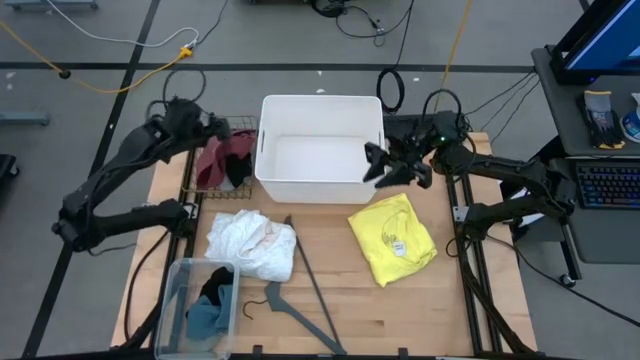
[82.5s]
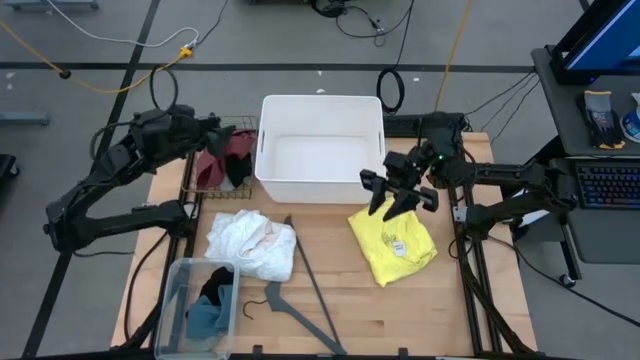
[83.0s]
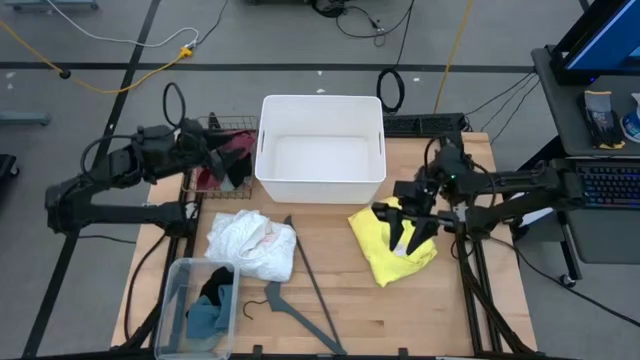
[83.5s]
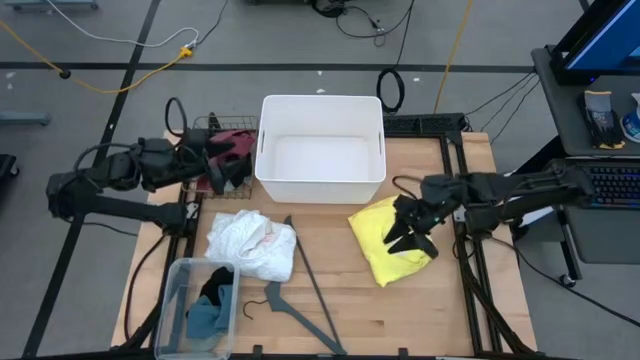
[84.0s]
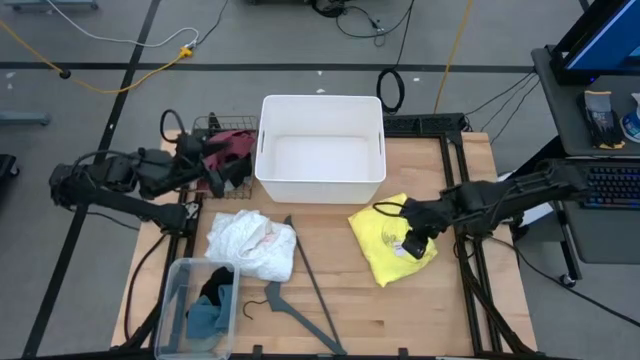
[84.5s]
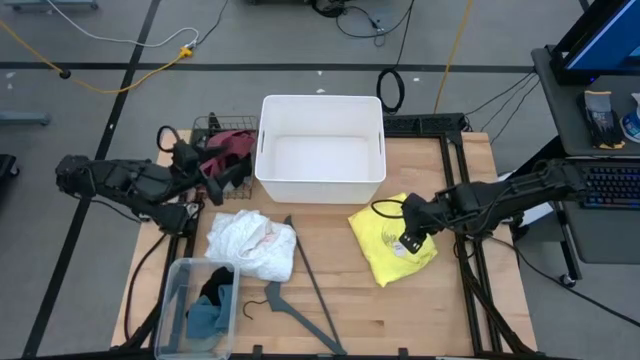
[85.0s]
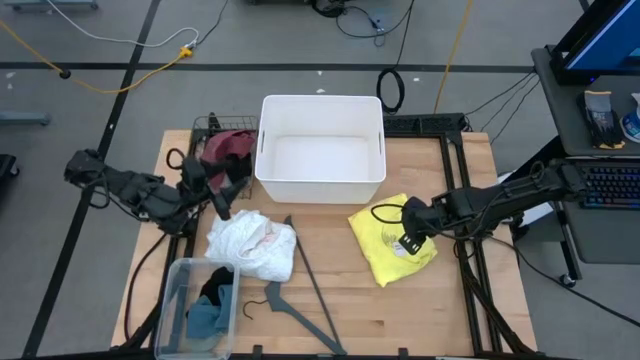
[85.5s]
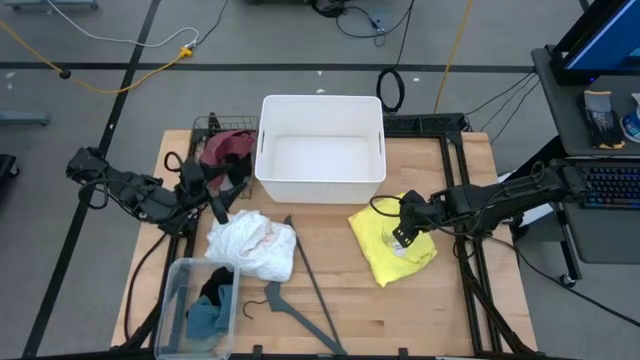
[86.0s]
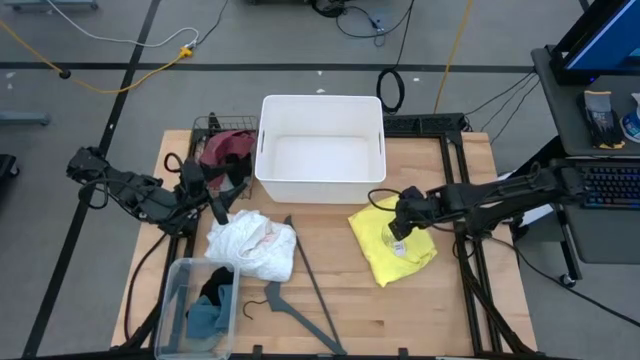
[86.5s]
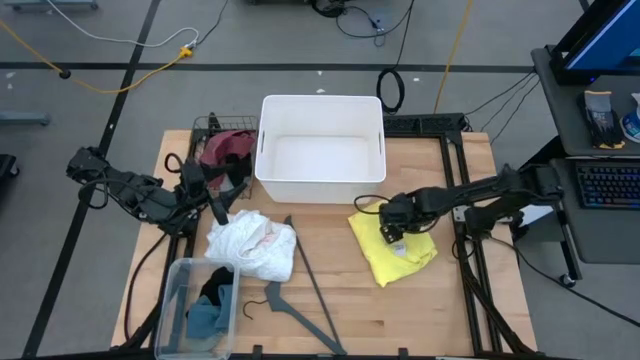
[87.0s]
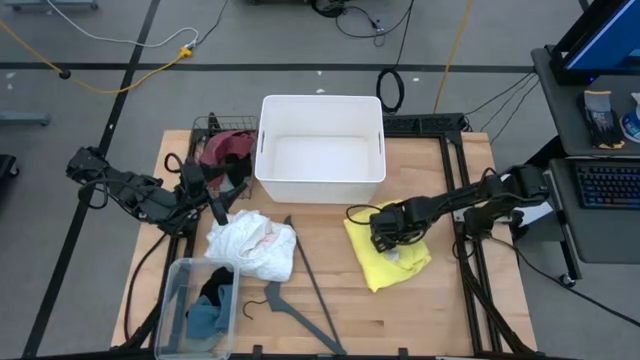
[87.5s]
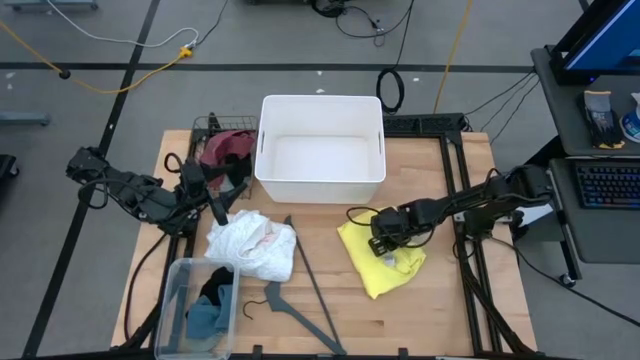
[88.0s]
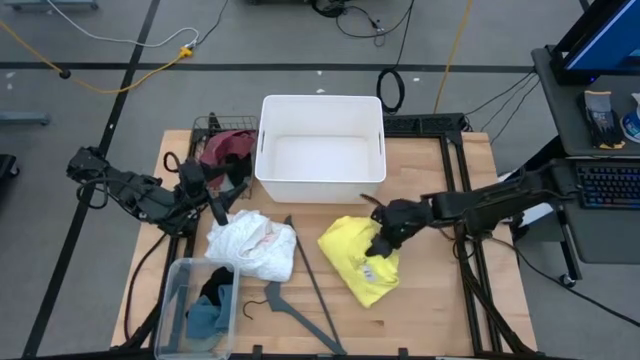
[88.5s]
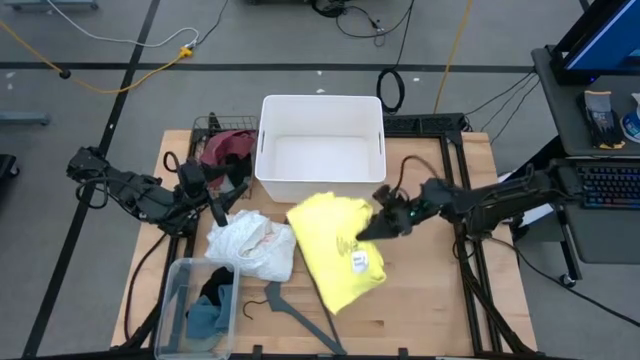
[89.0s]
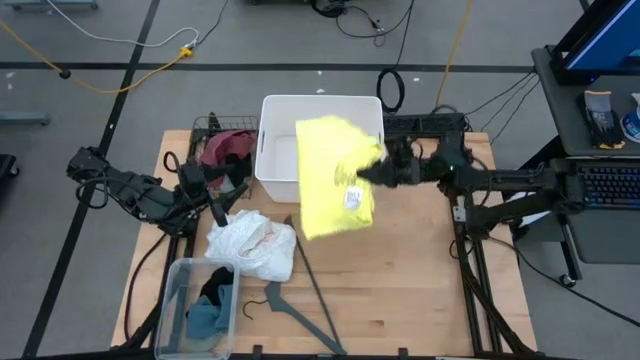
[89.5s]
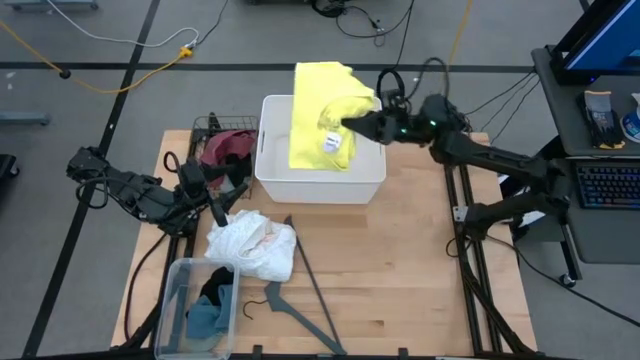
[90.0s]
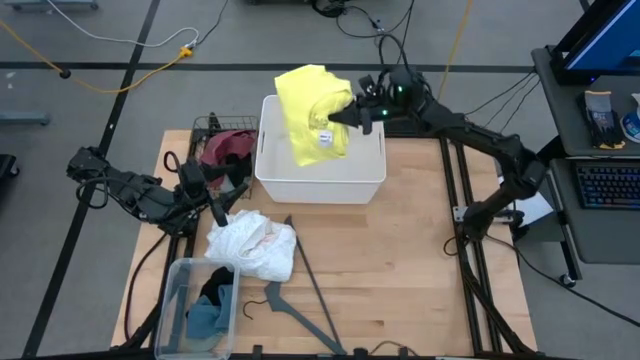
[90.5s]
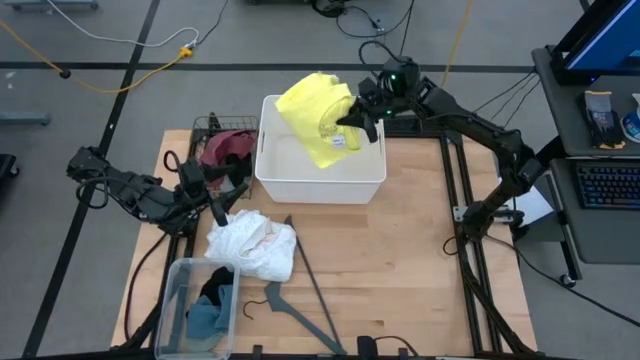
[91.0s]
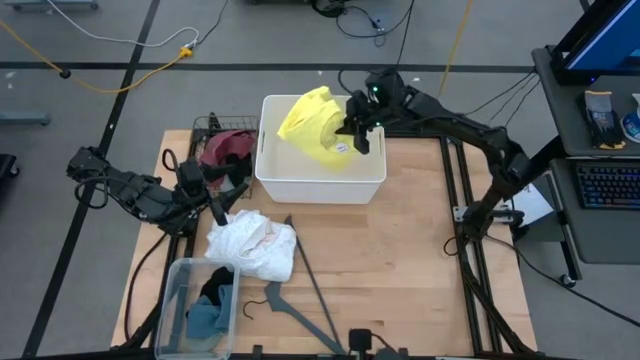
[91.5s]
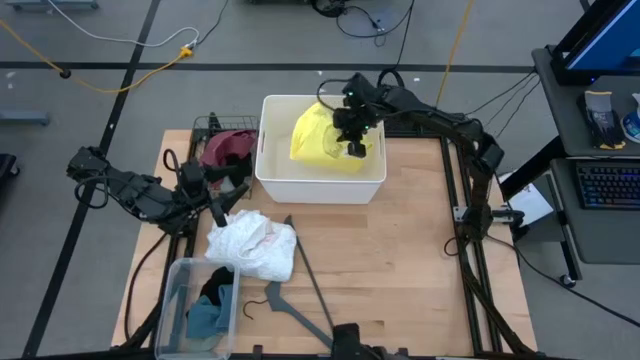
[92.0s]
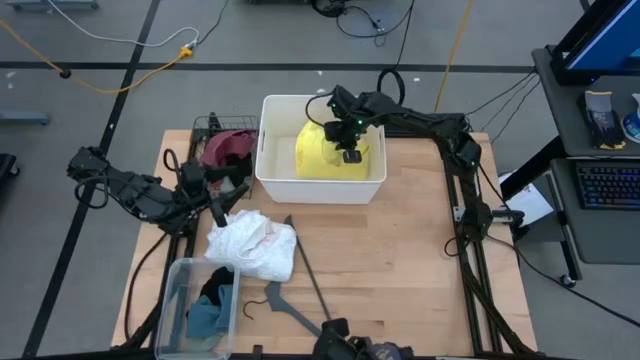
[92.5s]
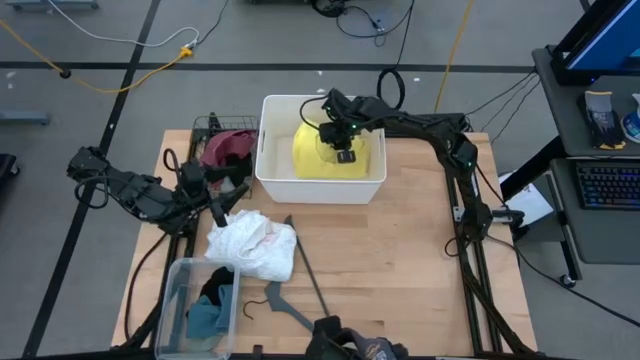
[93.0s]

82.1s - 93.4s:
Task: Pick & Place Cloths
Put the yellow shirt into the white bin

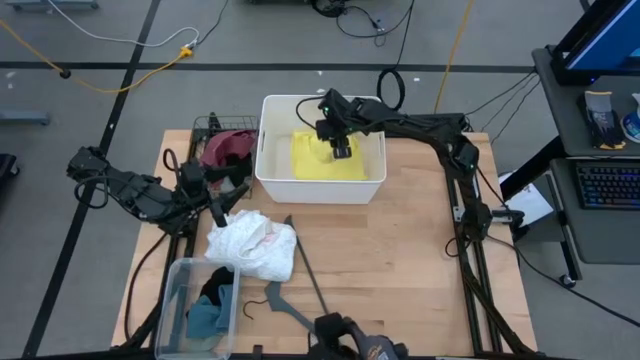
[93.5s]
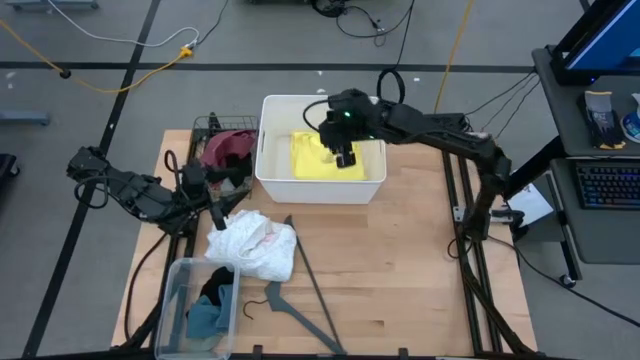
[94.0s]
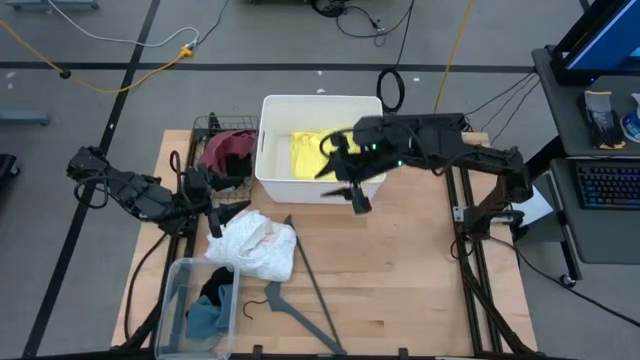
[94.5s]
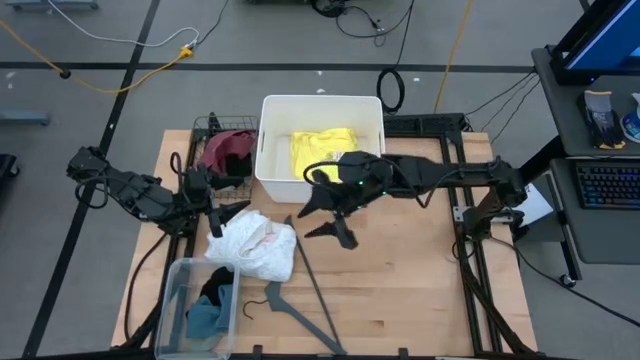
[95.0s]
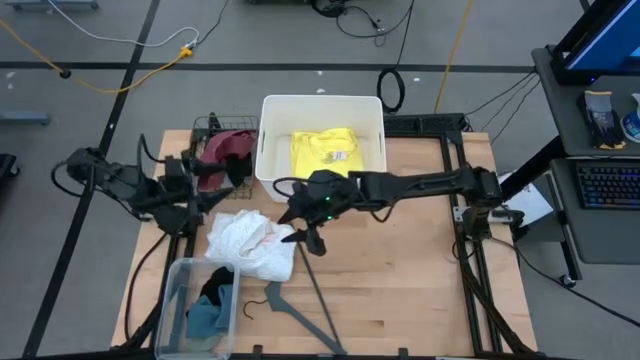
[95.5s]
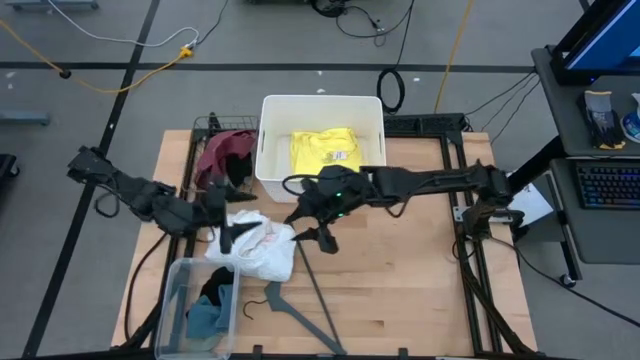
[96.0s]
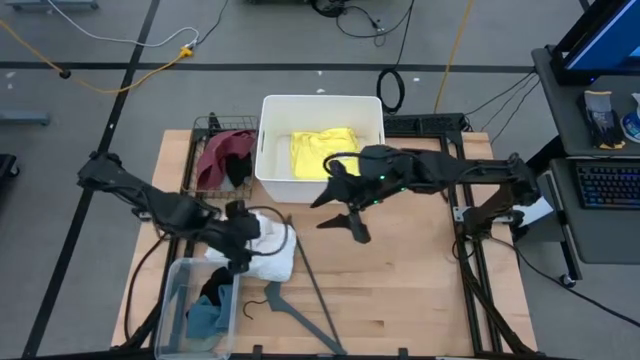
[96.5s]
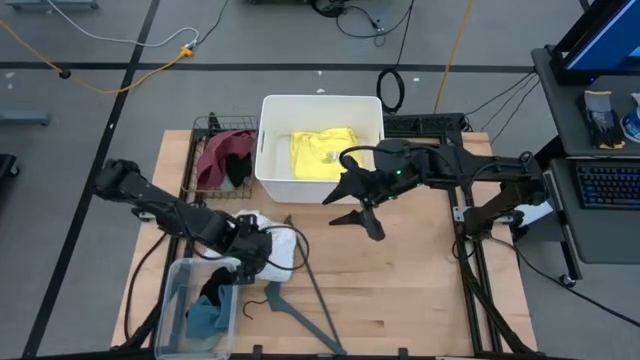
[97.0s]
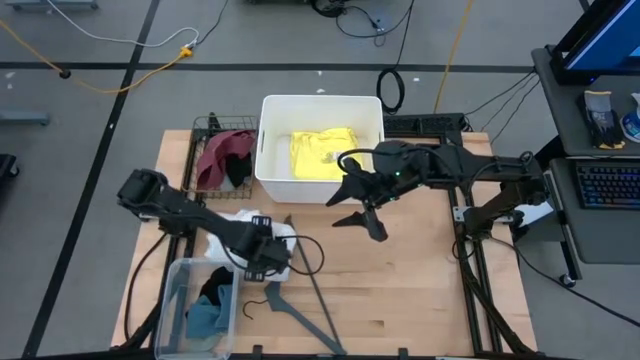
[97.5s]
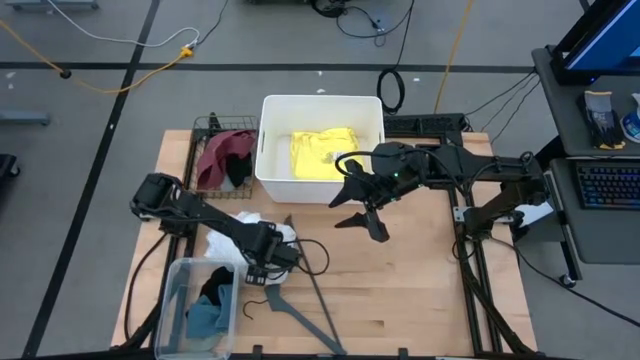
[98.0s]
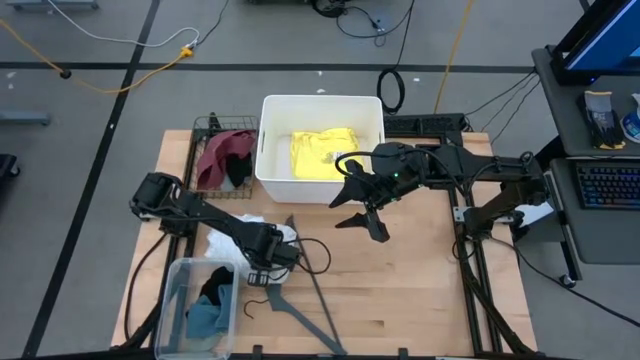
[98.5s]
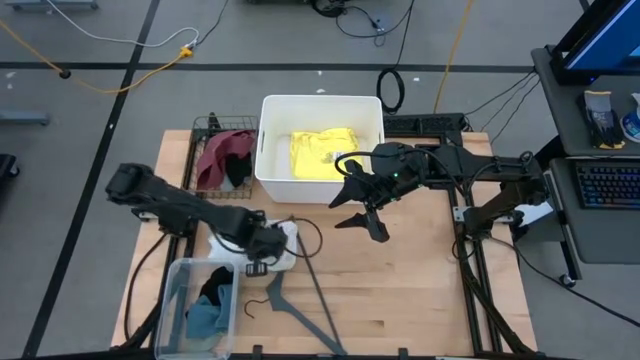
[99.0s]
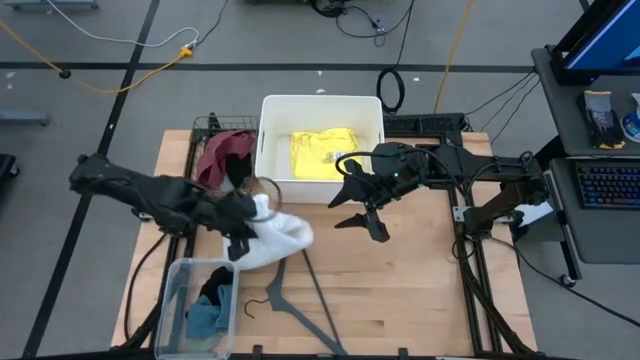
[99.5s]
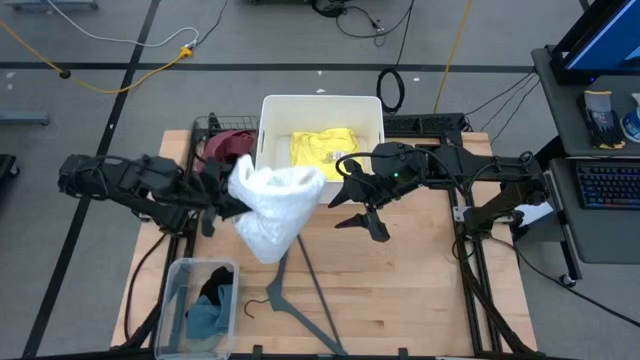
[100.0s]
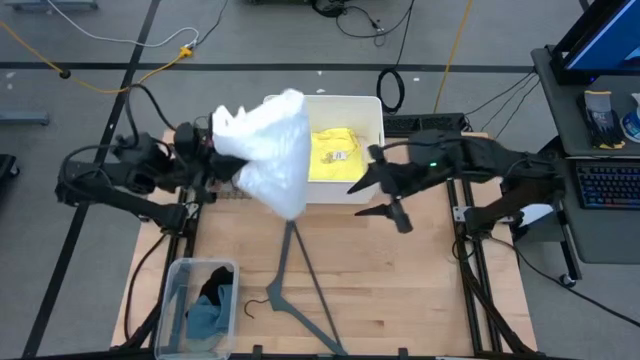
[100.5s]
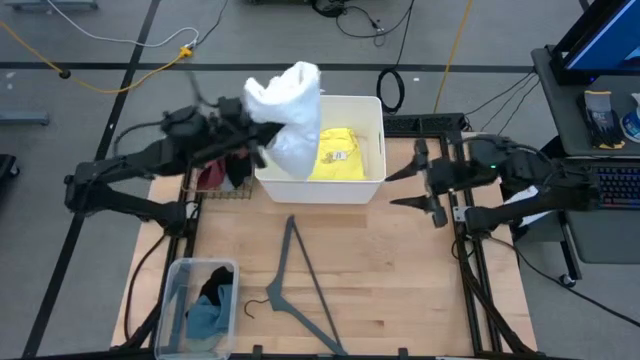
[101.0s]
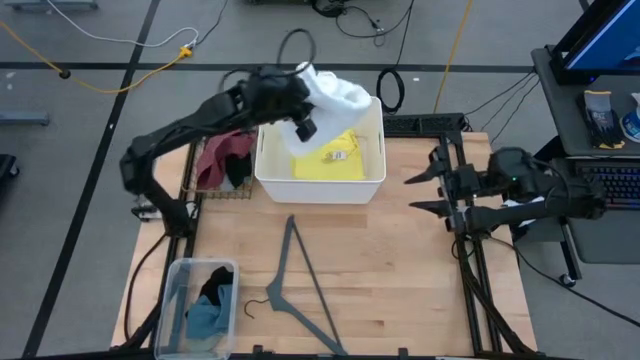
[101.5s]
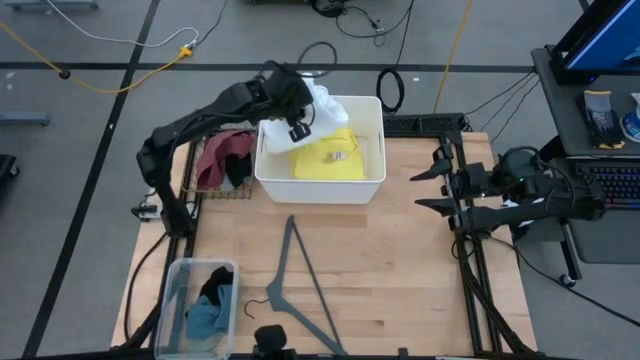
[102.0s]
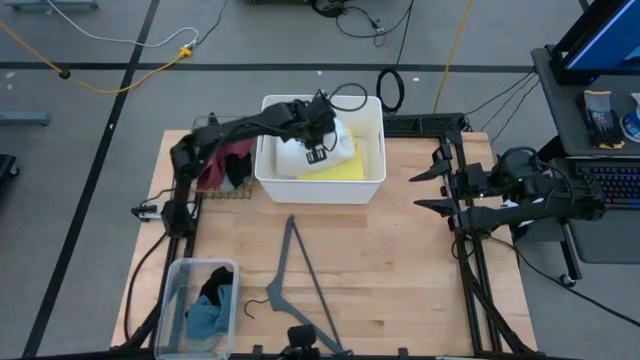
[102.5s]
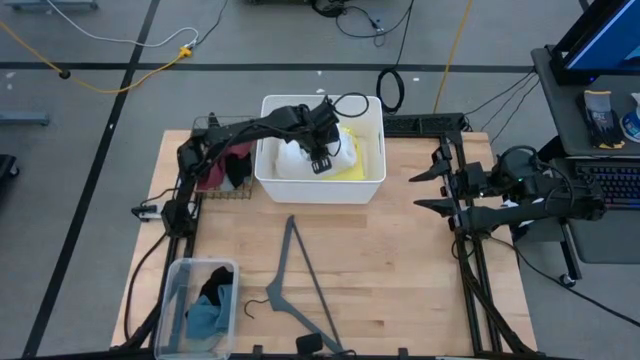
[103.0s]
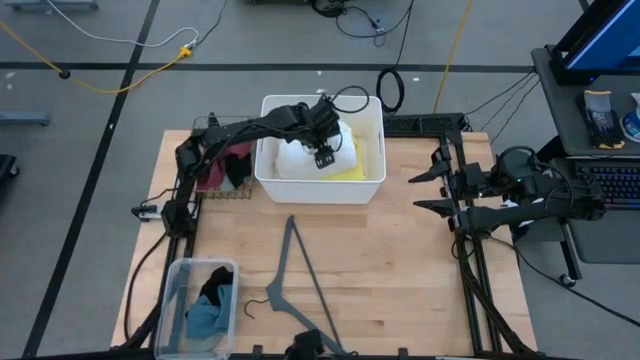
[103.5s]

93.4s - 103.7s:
Put the white shirt into the white bin

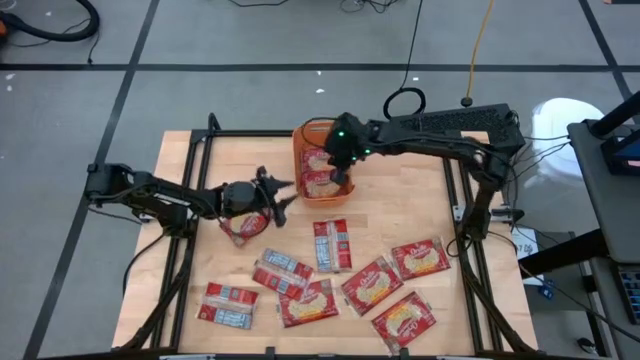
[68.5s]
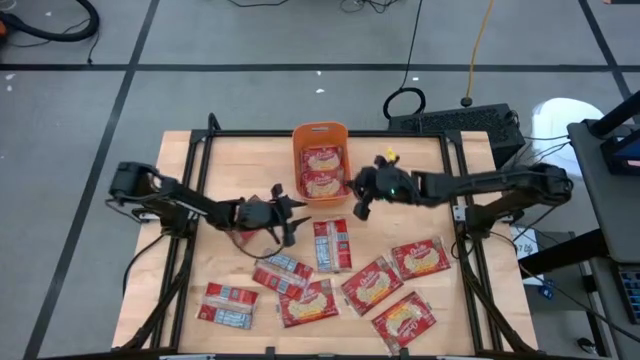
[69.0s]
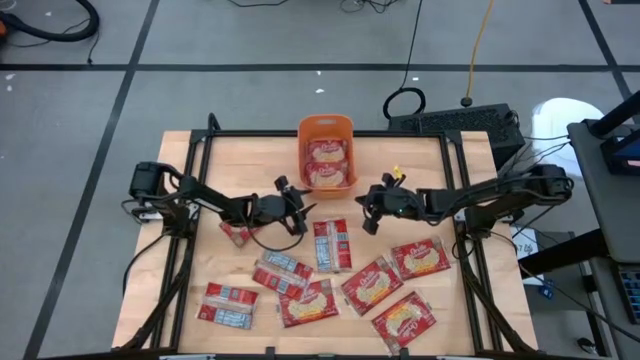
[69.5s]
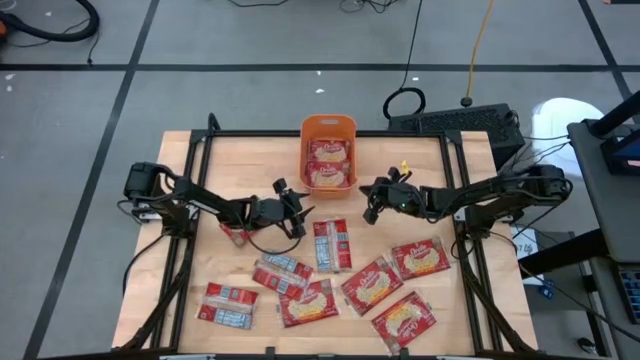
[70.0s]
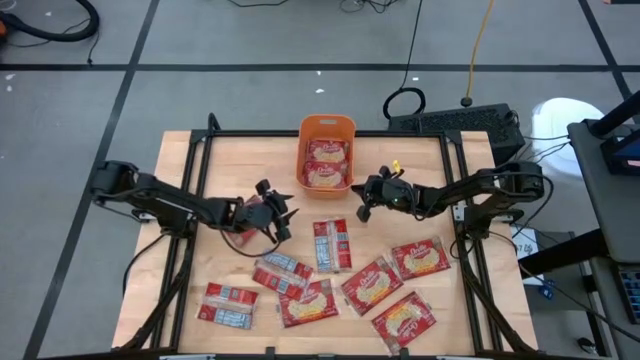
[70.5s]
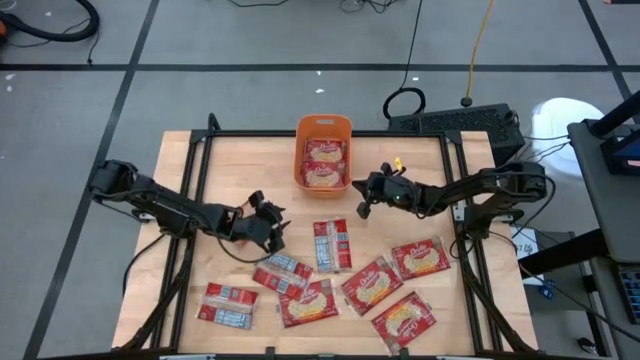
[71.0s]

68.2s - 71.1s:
Task: Sort popcorn bags into baskets
Adjust orange bin on the table
